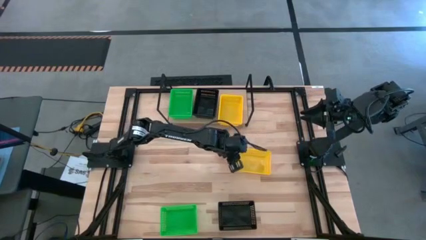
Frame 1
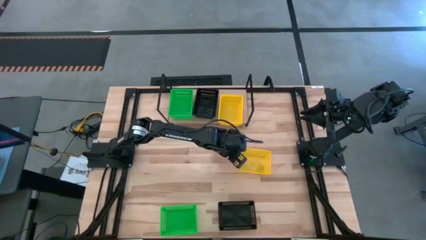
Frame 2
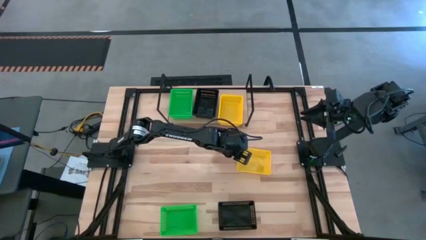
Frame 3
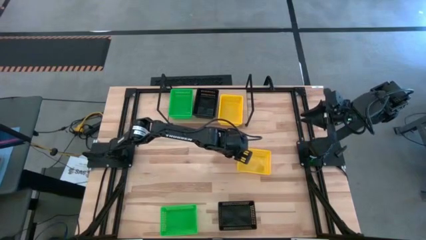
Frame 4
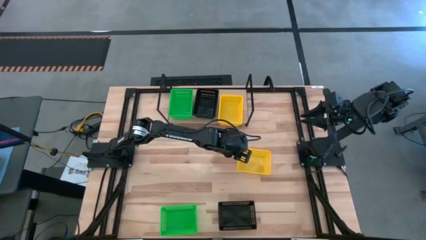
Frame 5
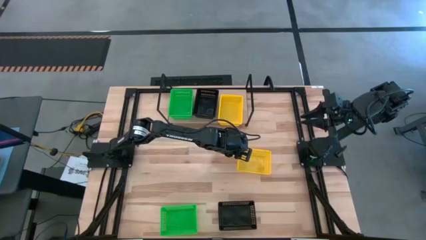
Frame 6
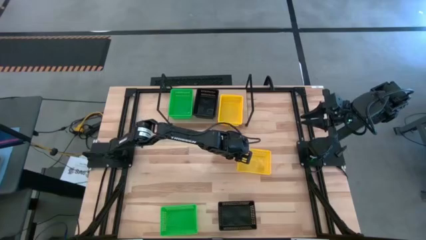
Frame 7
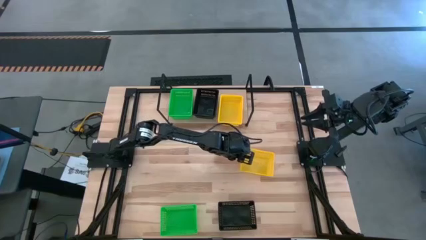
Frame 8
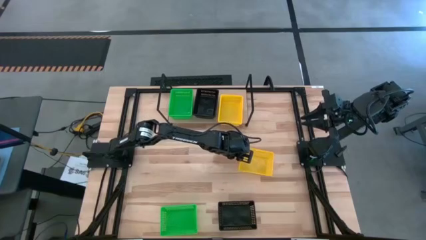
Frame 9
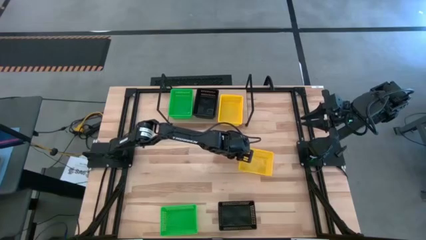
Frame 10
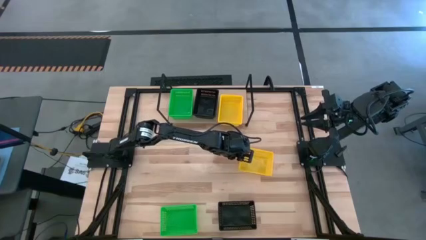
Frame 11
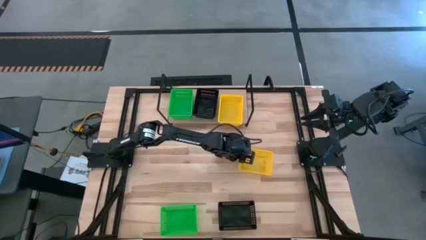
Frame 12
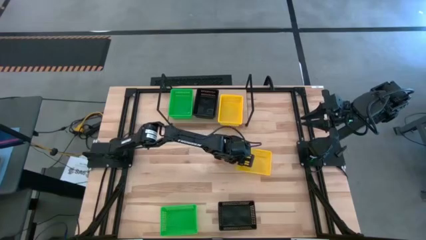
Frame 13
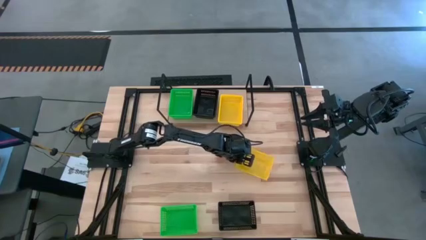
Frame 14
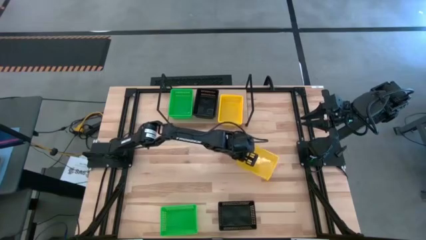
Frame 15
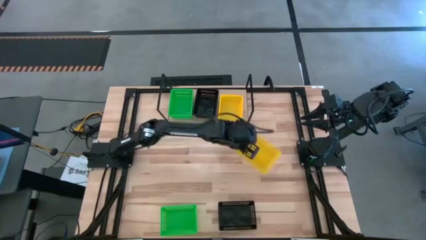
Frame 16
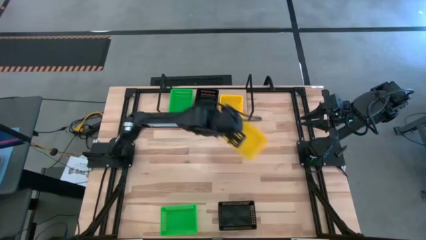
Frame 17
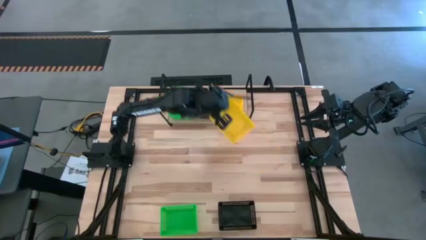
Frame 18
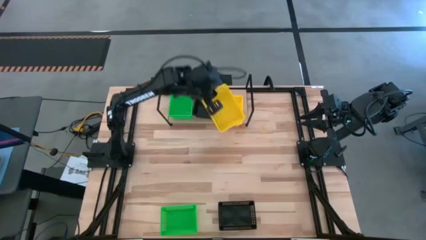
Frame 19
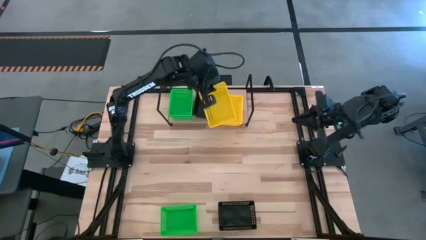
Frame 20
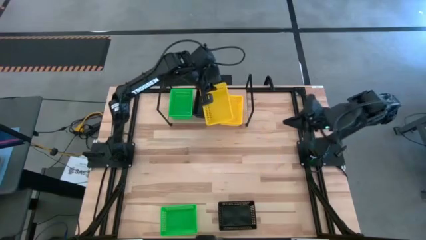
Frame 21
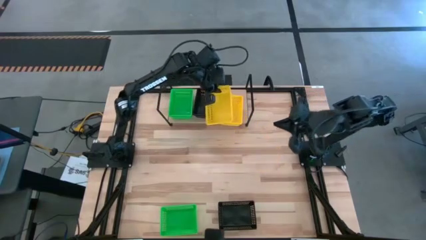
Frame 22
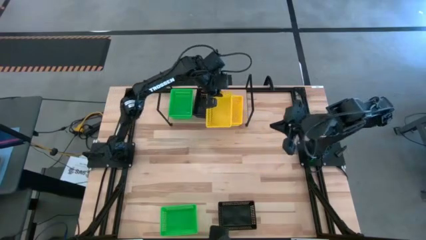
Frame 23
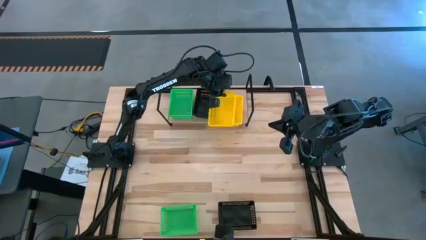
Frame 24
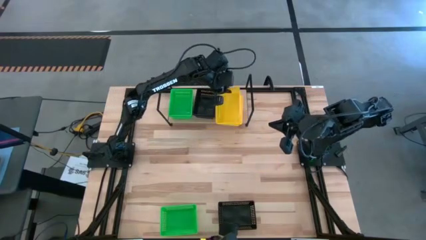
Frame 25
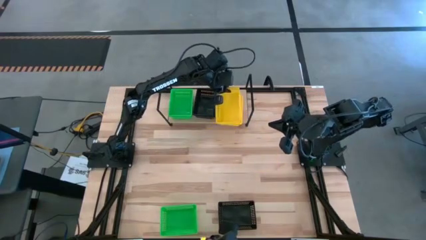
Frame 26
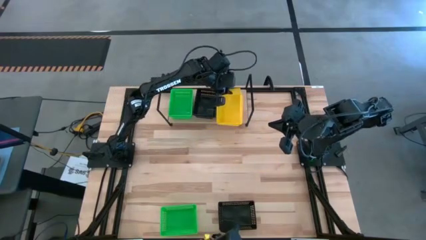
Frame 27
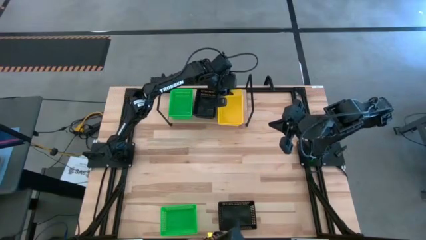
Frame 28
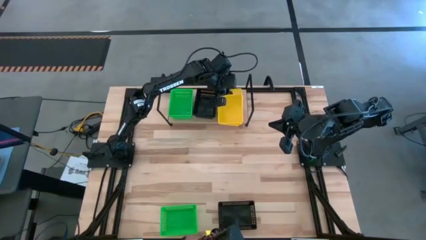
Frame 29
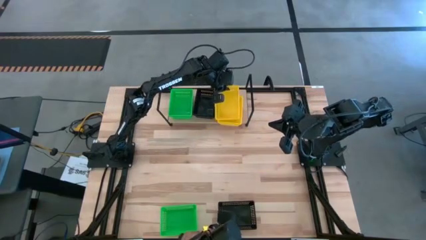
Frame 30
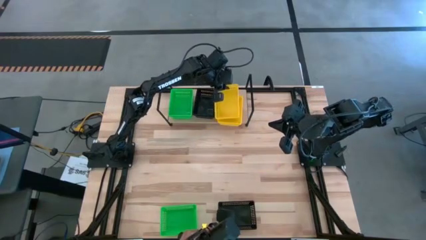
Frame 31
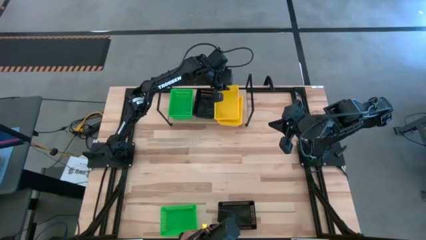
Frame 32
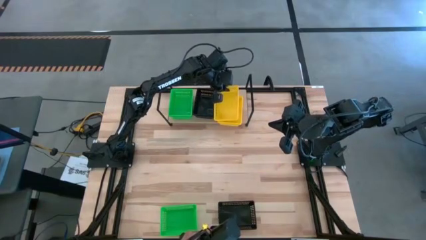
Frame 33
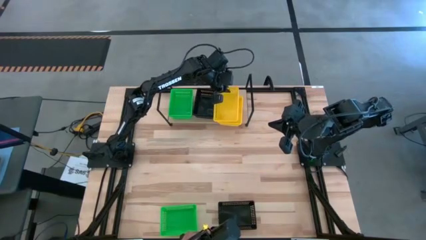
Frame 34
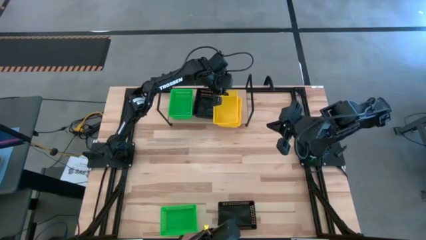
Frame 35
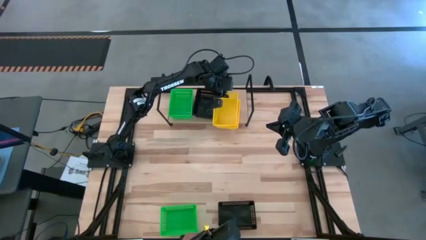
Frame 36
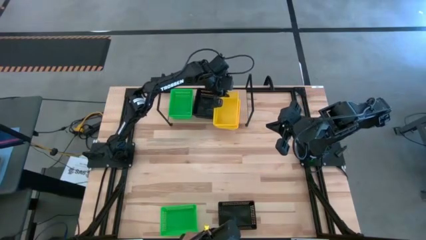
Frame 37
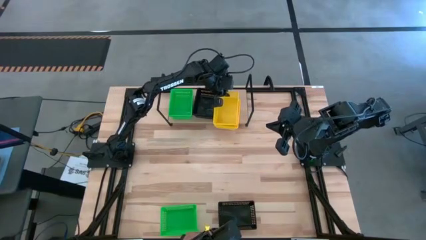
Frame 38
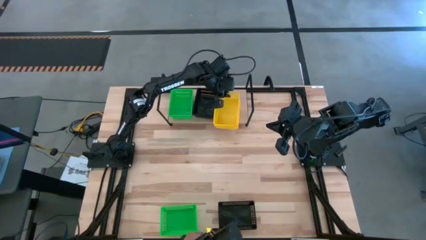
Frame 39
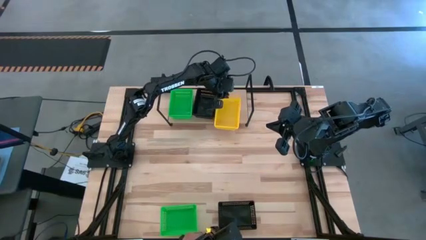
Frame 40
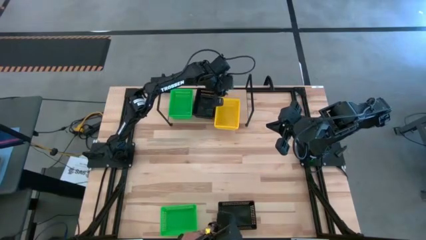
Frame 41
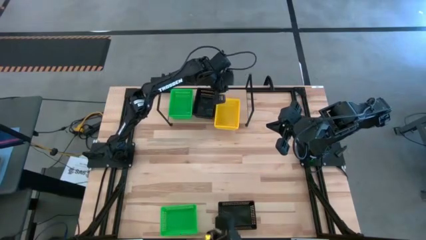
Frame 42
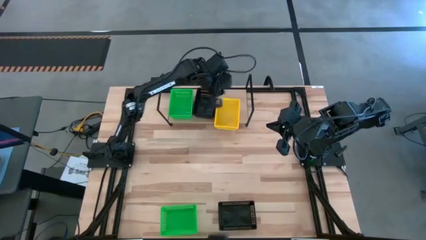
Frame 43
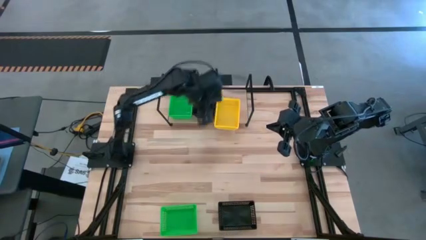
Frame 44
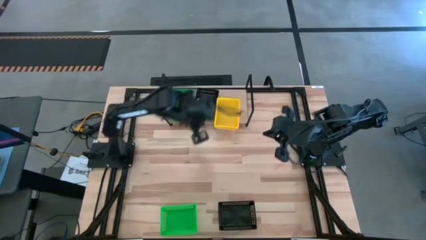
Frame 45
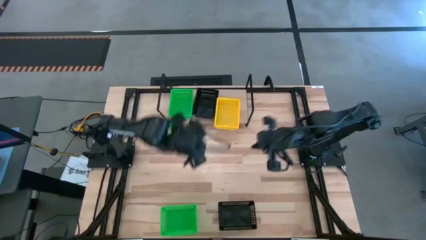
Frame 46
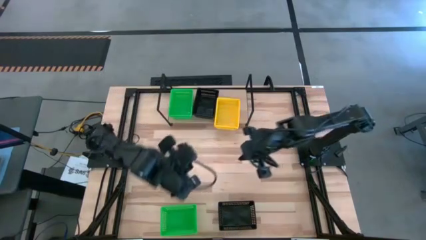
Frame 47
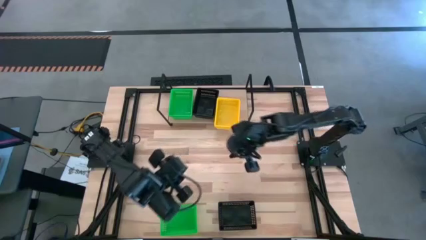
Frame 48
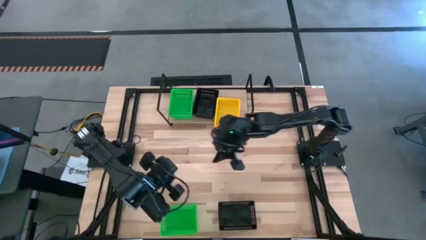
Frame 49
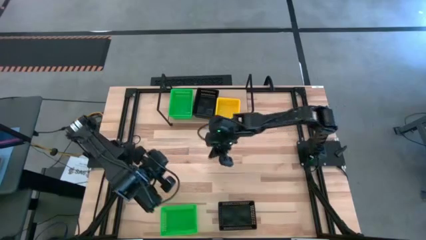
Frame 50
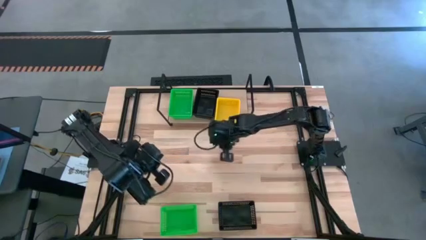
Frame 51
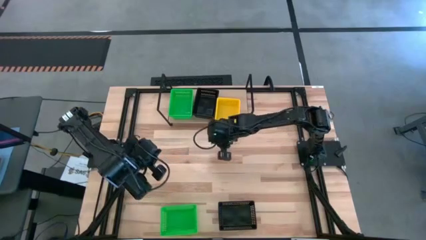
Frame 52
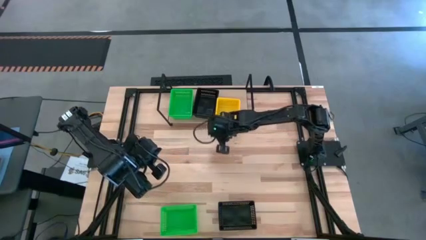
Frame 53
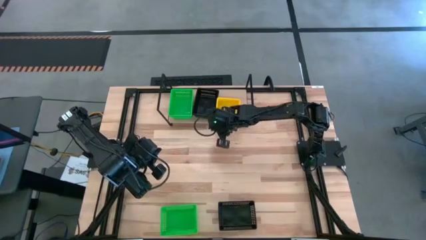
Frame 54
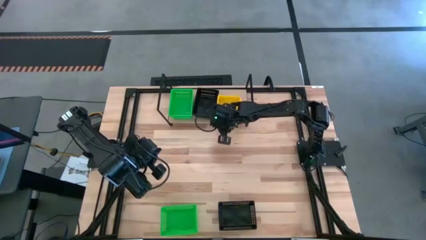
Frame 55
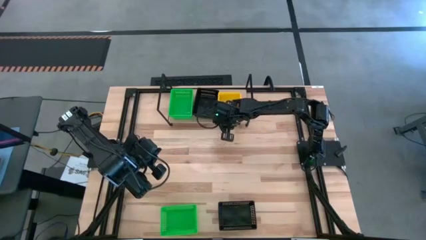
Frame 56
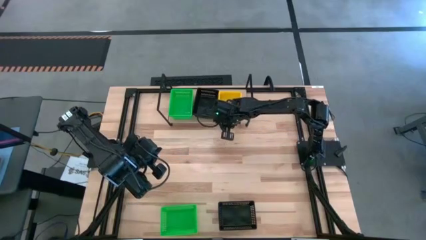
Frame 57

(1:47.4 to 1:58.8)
Task: Stack baskets on shelf by color
Stack the yellow basket on top of the yellow basket on the shelf
